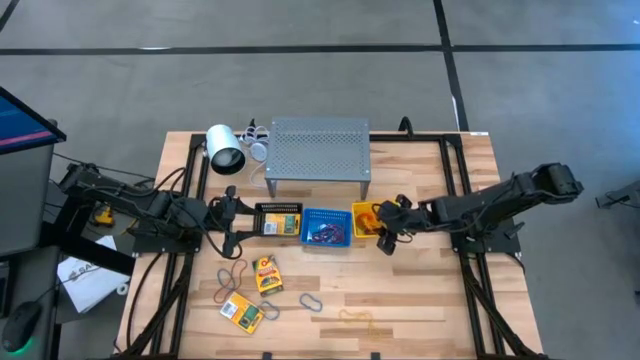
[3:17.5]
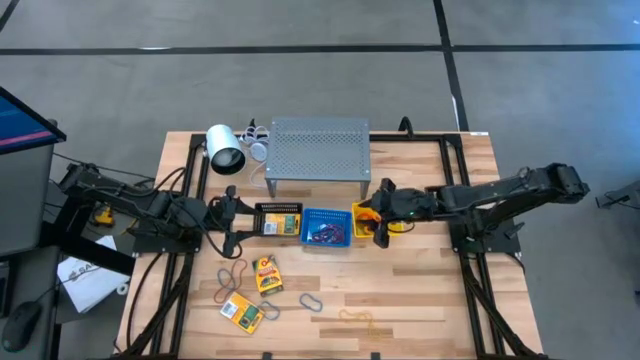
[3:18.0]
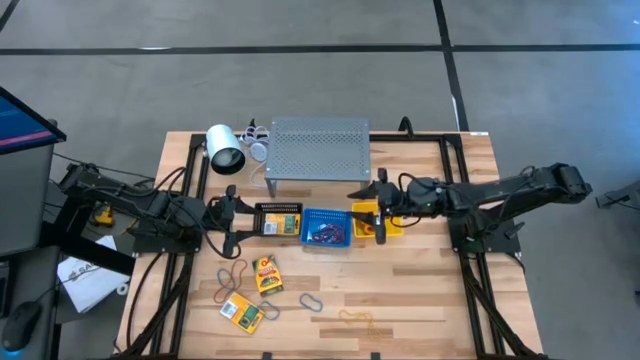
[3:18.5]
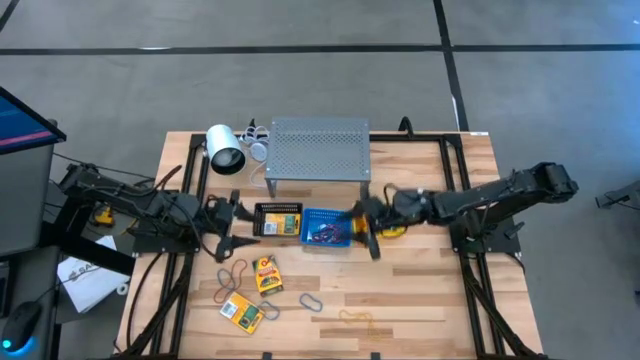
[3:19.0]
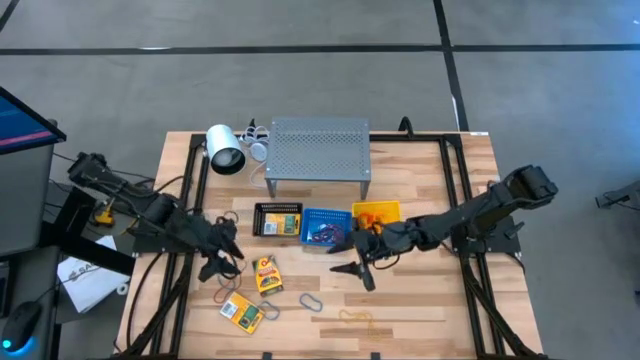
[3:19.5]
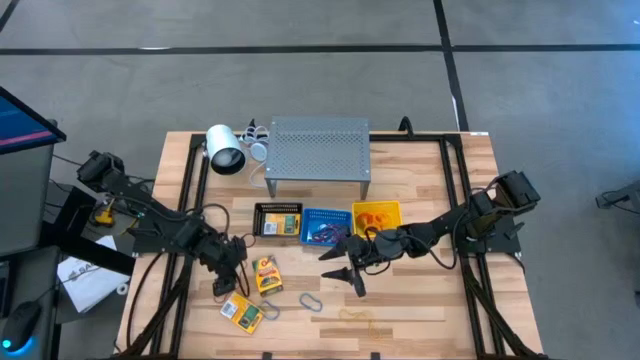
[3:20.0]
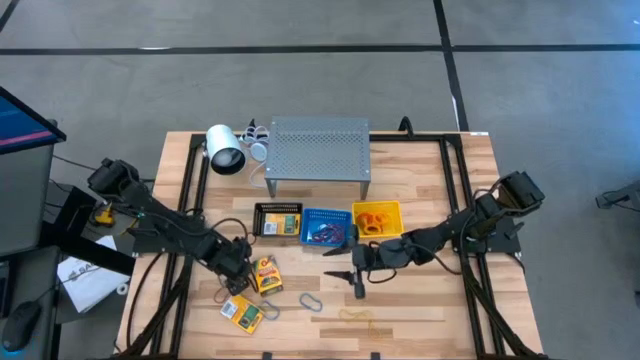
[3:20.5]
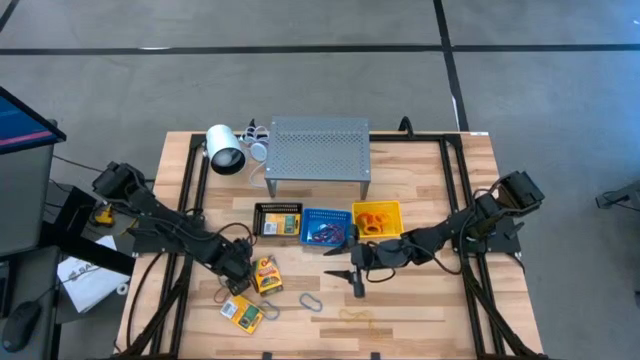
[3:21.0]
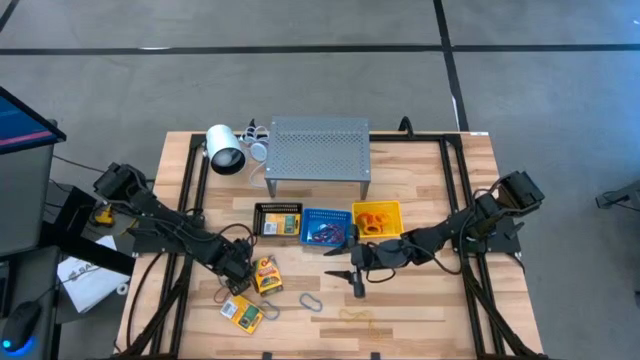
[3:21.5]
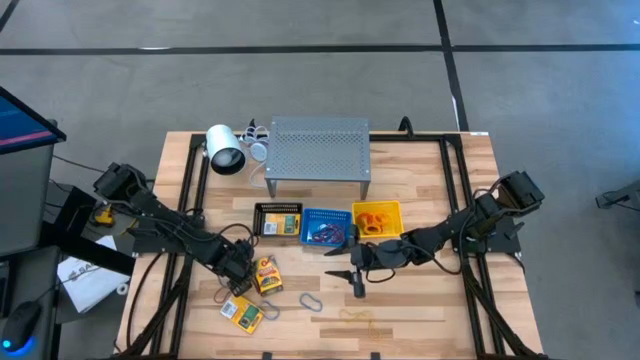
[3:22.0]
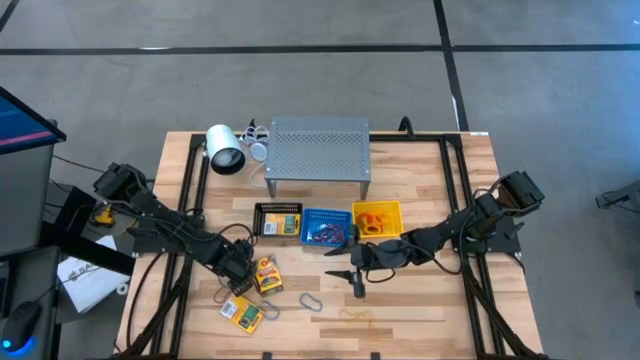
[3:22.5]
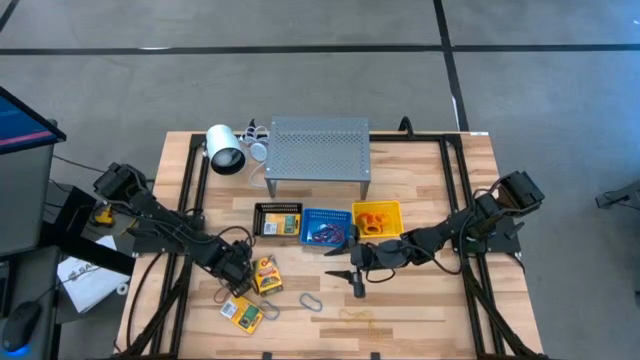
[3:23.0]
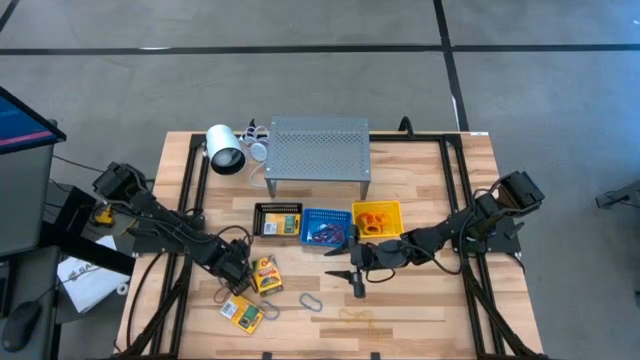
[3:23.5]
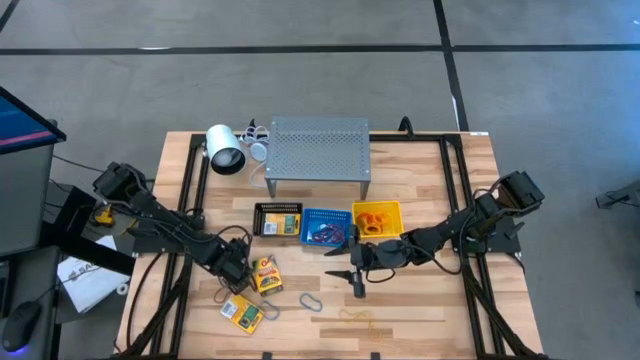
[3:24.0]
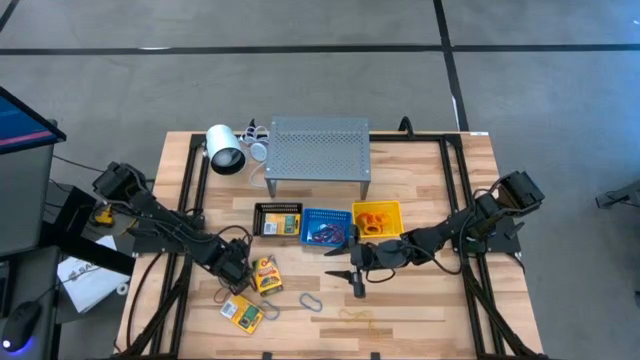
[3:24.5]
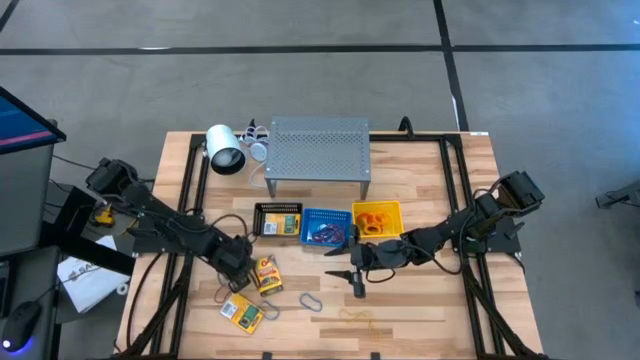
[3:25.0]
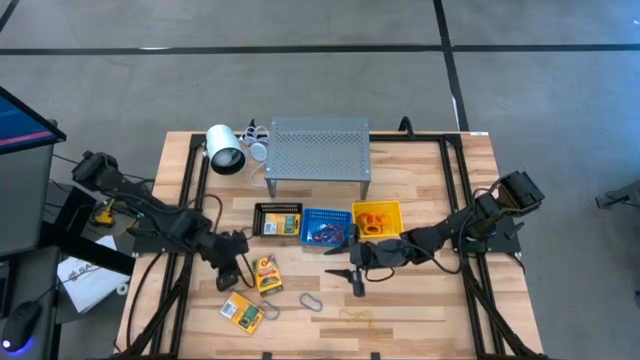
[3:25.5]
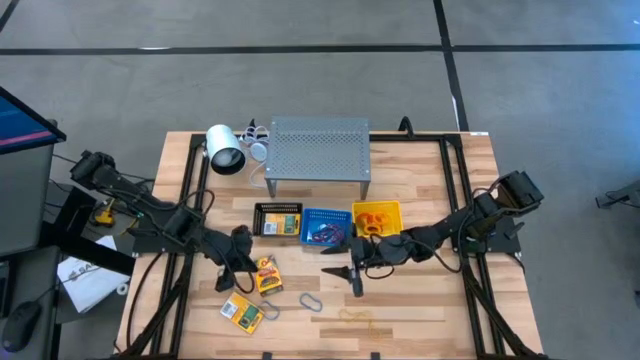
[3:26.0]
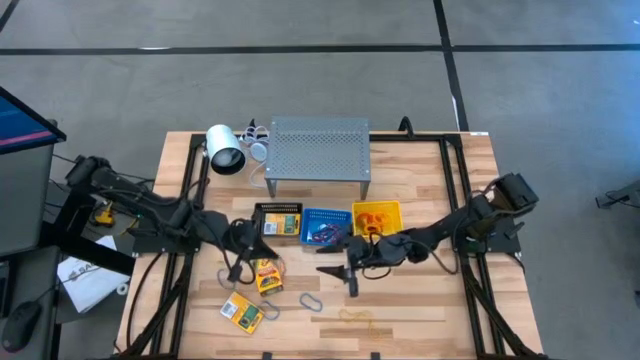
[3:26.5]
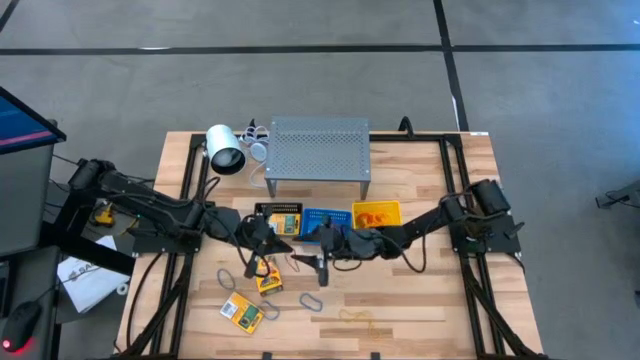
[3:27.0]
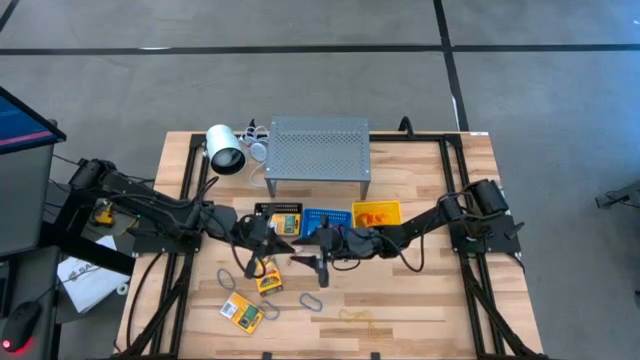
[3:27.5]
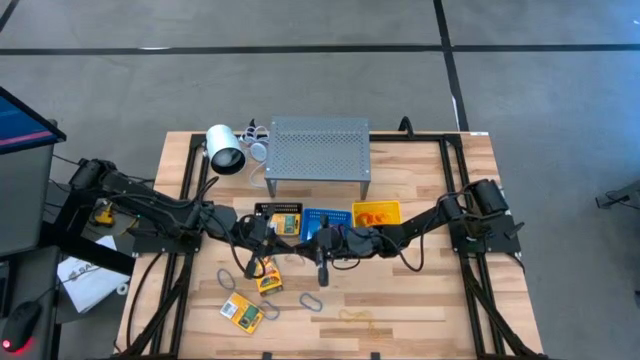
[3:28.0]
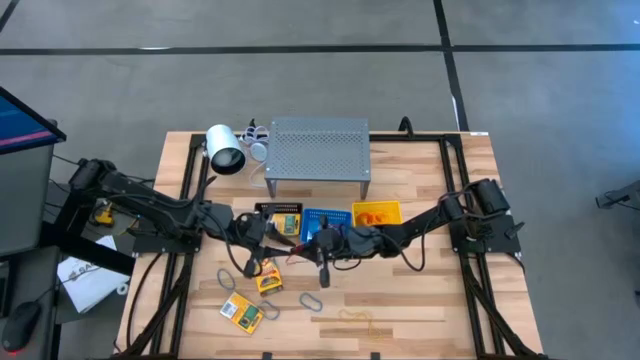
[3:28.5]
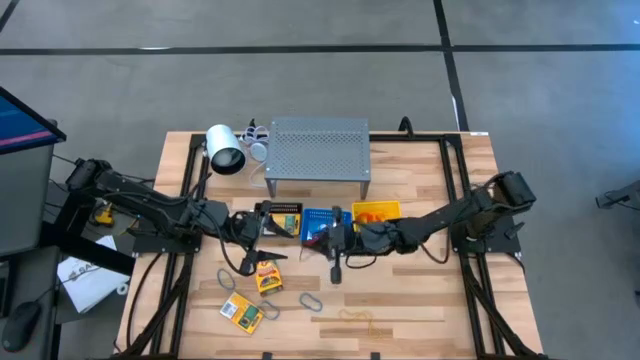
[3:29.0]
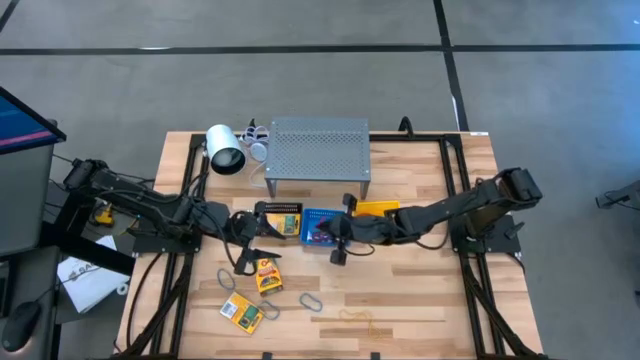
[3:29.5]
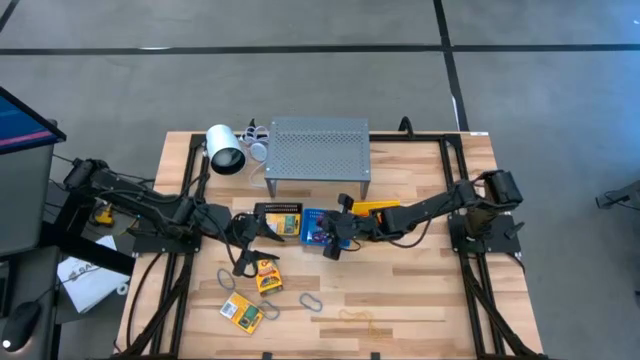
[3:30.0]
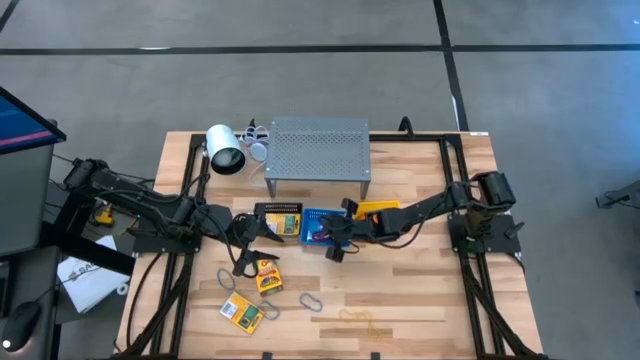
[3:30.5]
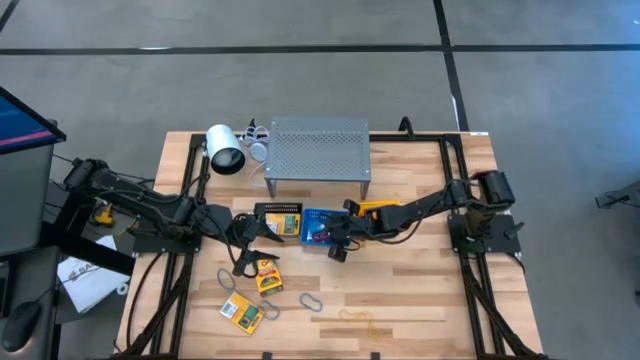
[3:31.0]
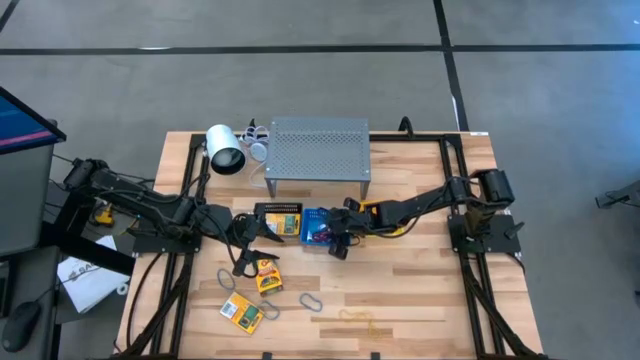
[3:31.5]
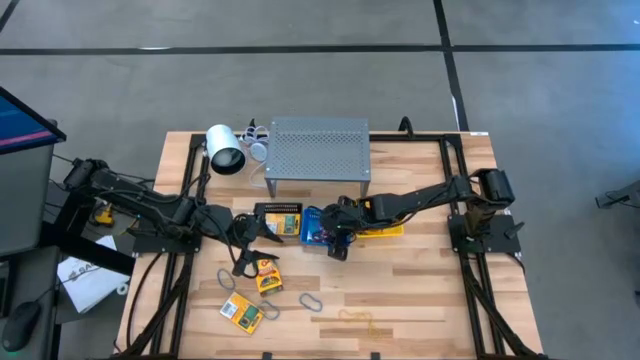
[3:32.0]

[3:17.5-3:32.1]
Task: Pick & Place Office Desk Supplies
Put the red rubber band into the blue bin

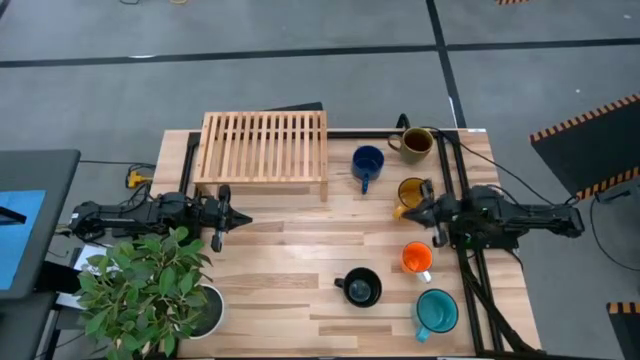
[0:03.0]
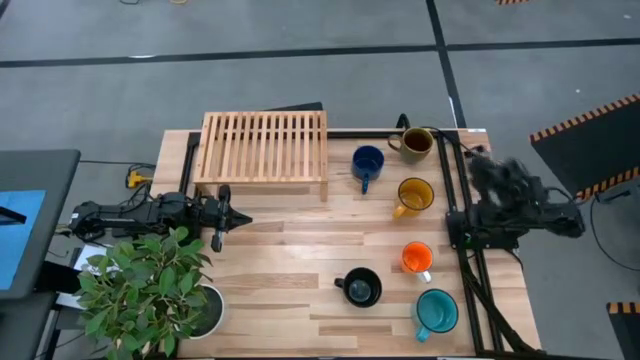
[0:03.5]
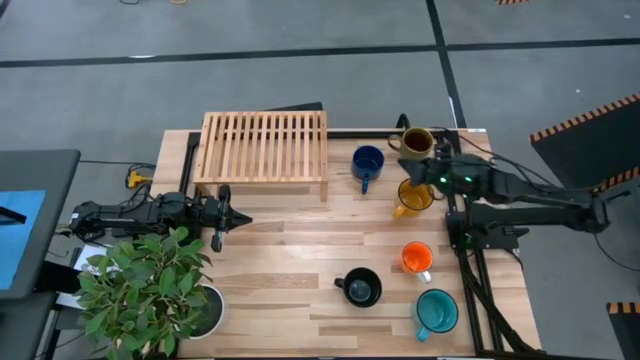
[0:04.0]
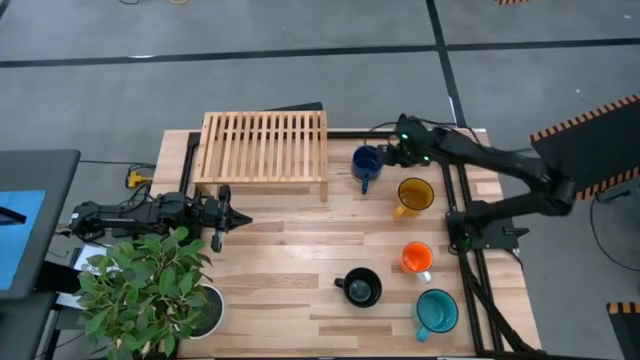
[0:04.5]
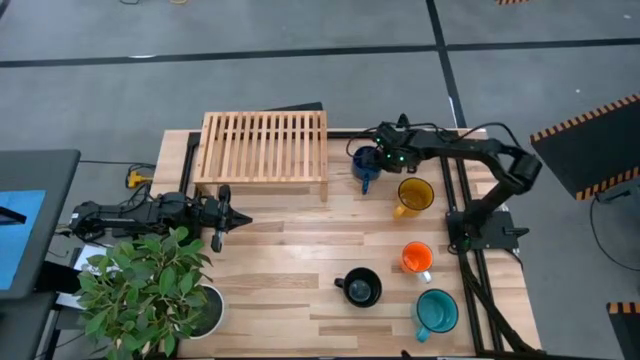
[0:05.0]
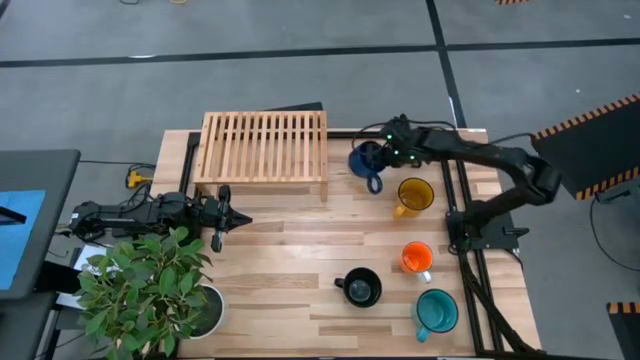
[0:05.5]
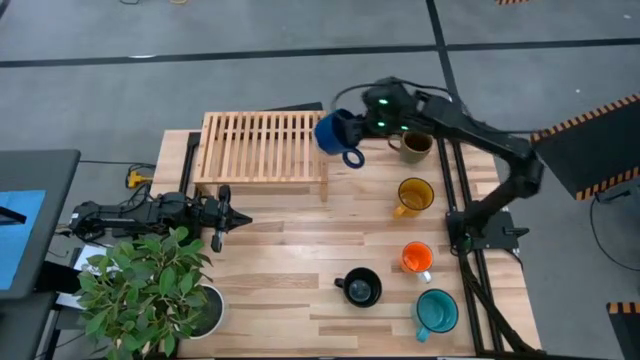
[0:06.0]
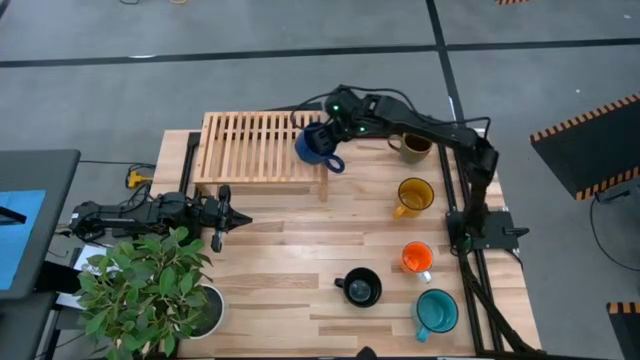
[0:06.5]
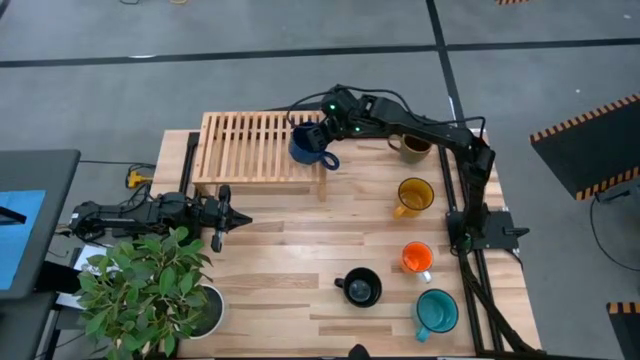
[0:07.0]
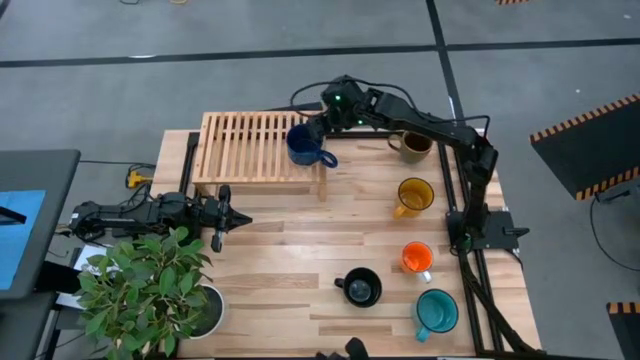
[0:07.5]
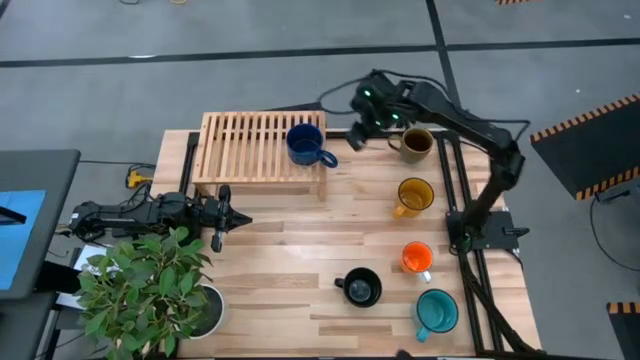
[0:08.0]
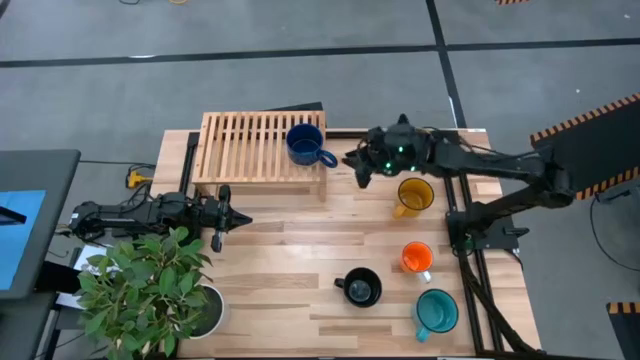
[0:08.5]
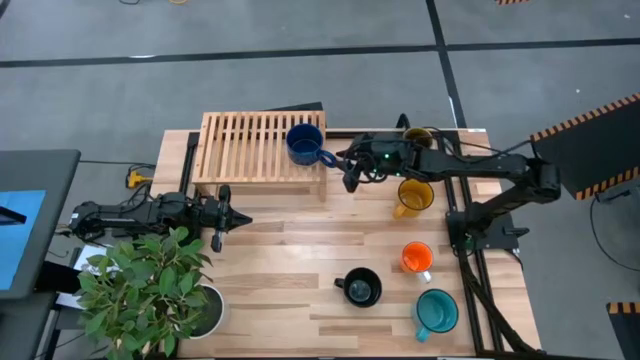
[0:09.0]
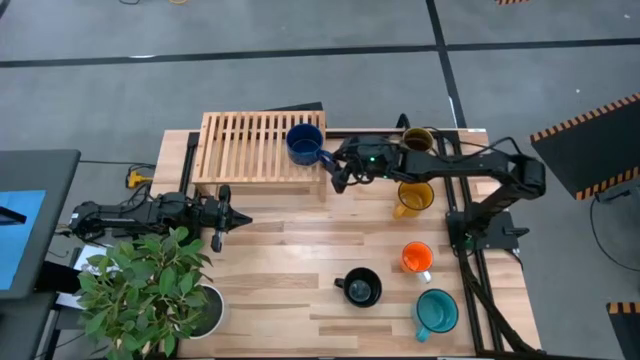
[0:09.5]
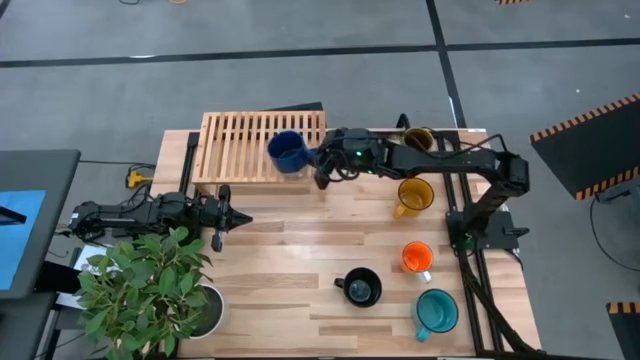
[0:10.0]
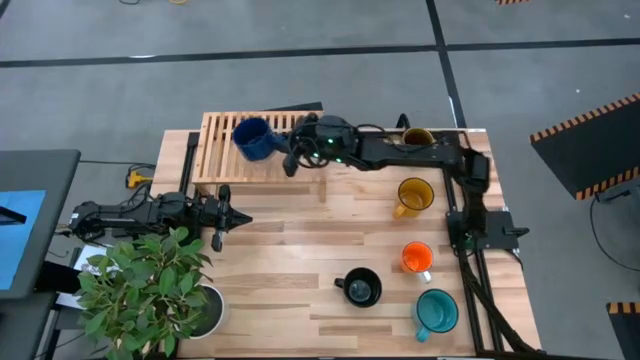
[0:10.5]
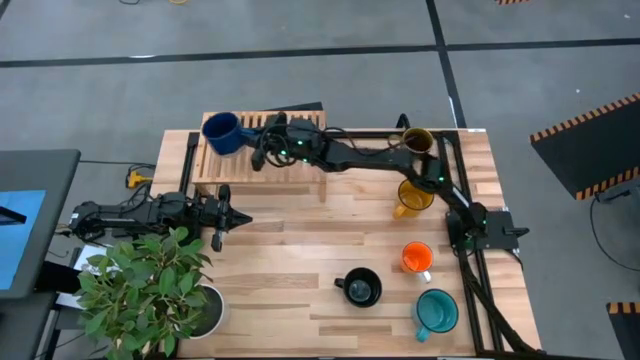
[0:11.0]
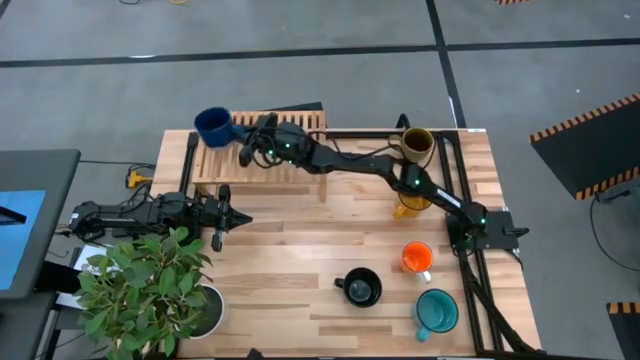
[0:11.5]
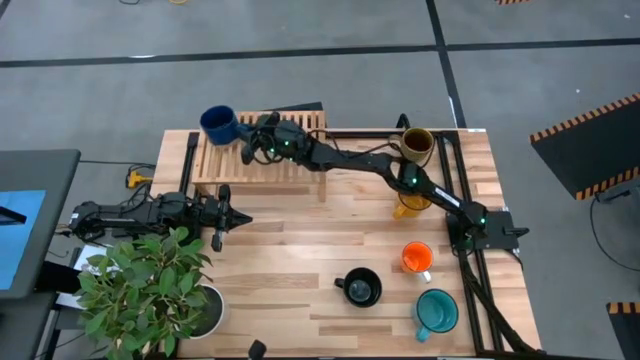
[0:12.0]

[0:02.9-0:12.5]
Task: Place coffee mugs
Put the dark blue mug on the shelf
